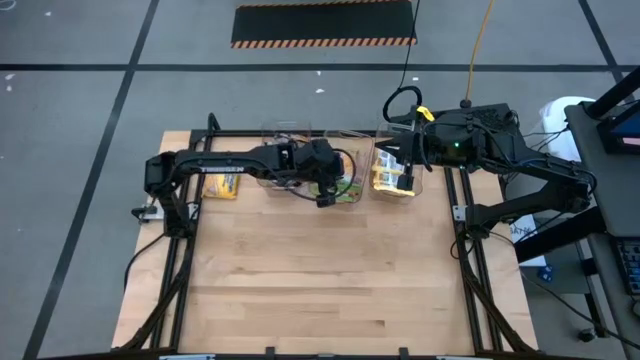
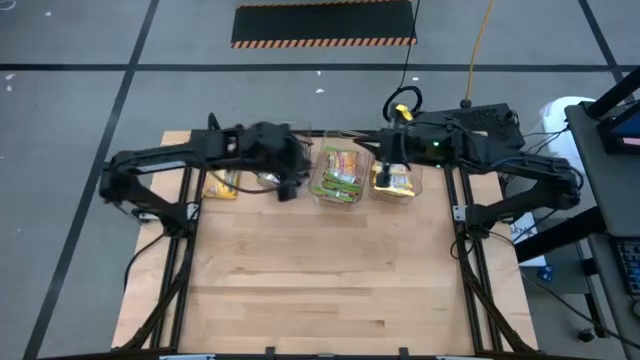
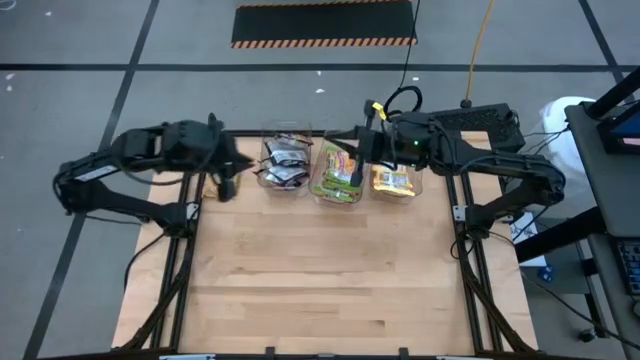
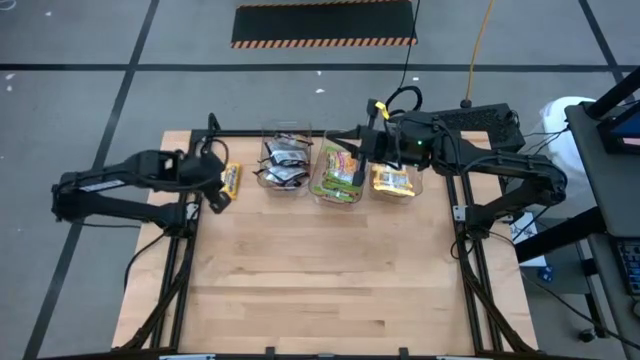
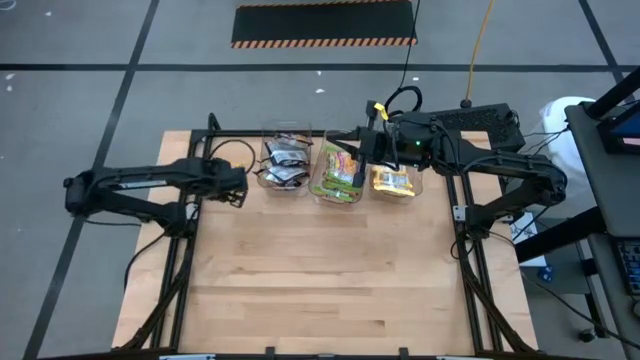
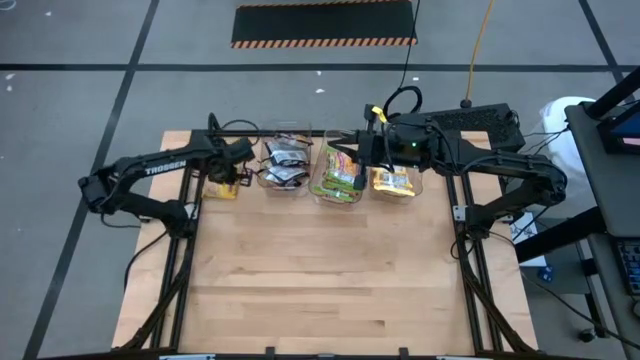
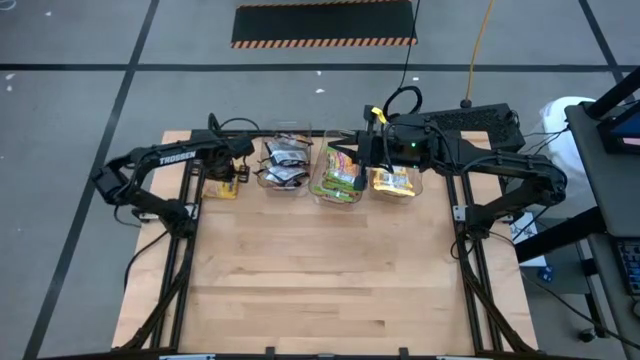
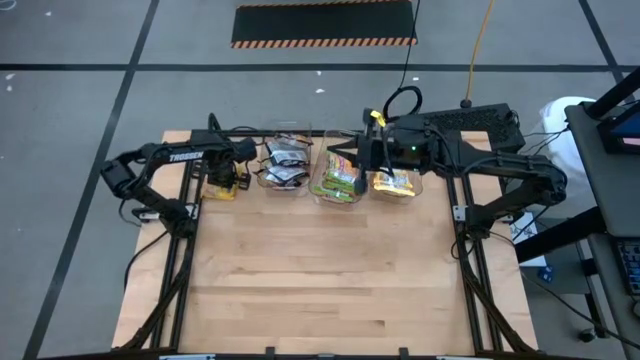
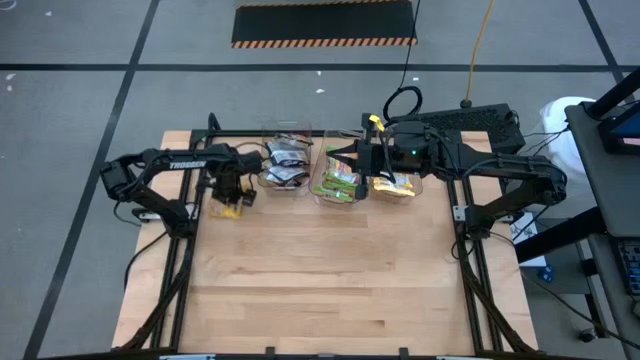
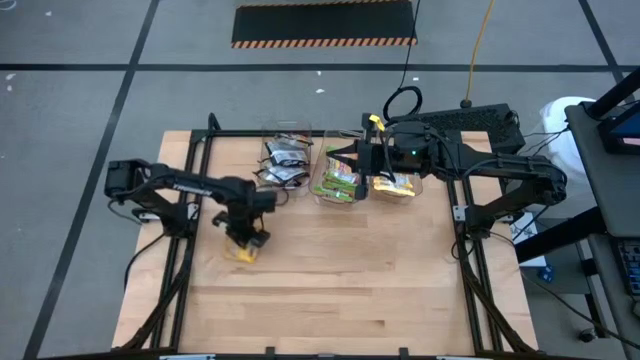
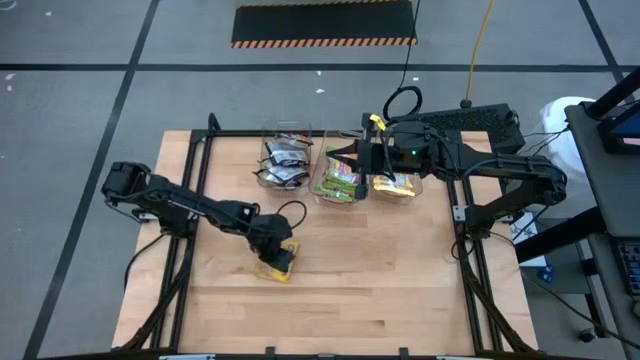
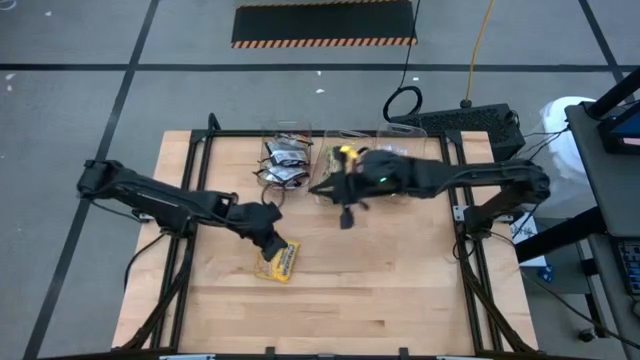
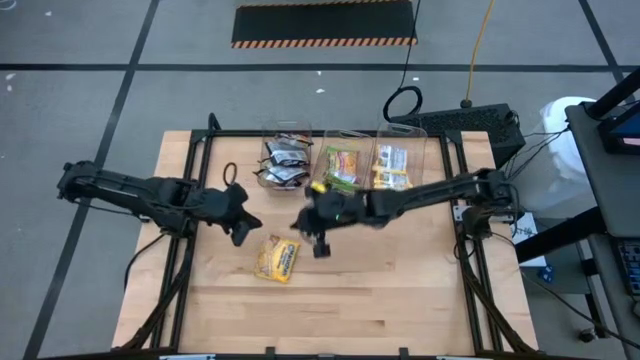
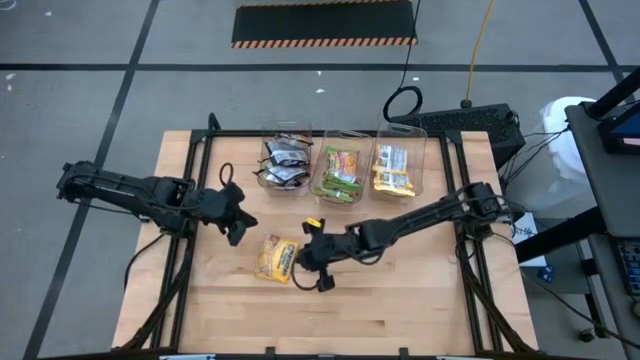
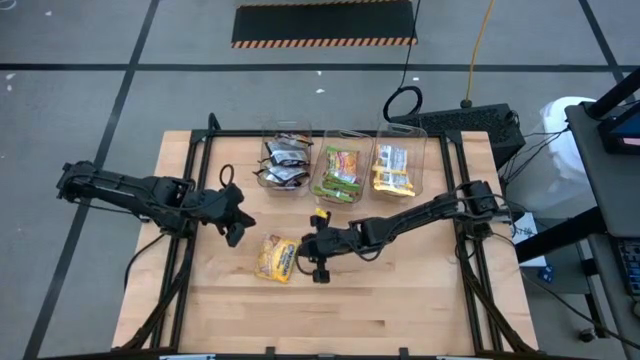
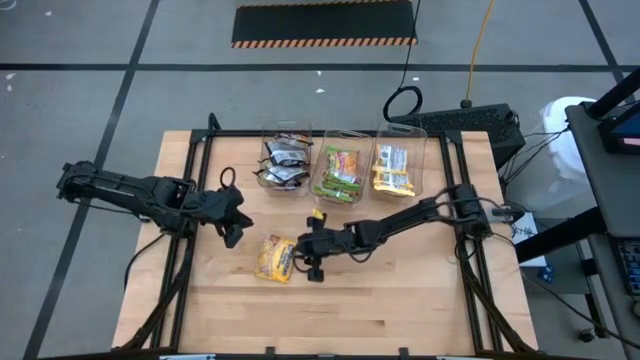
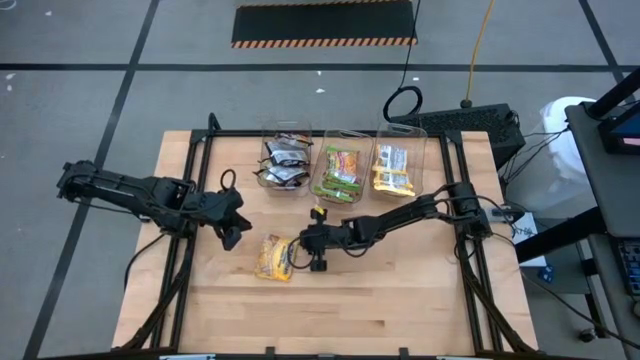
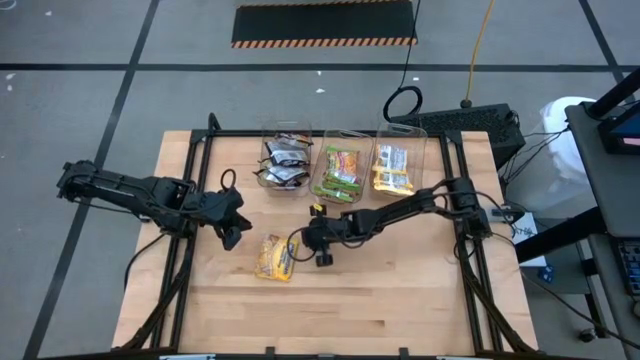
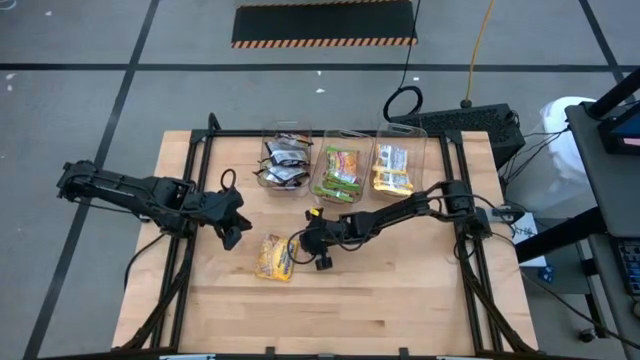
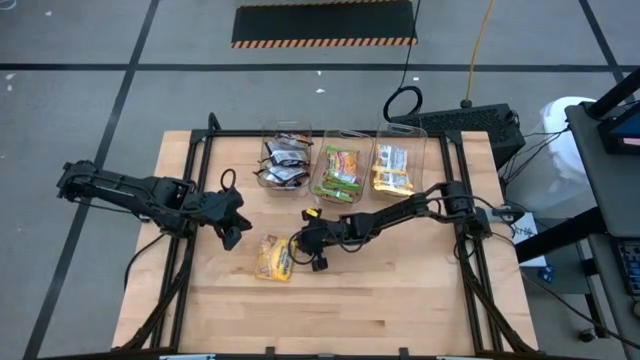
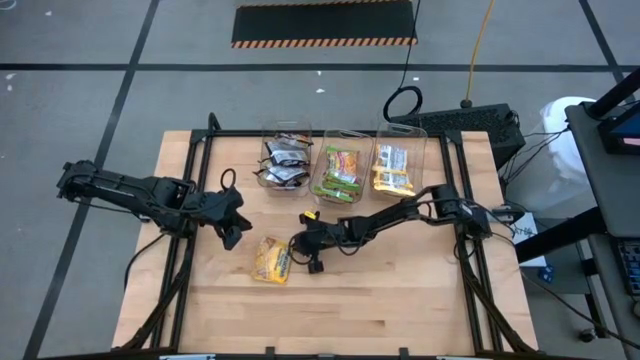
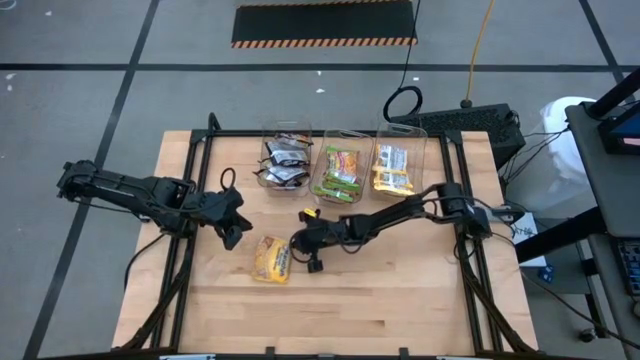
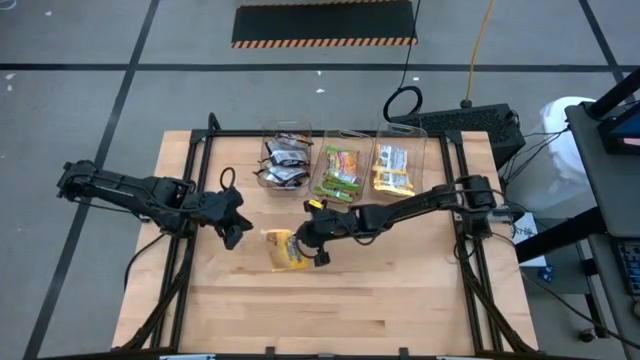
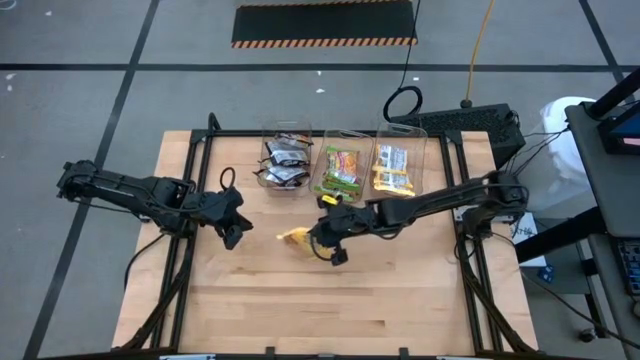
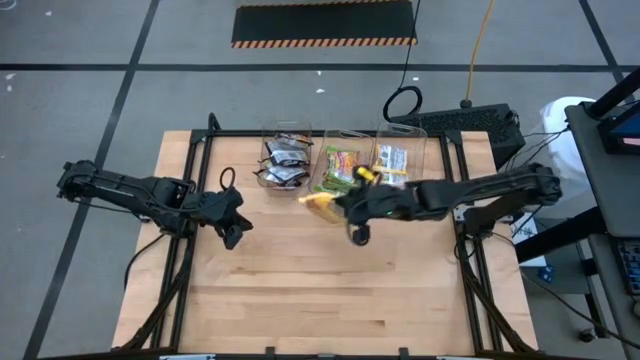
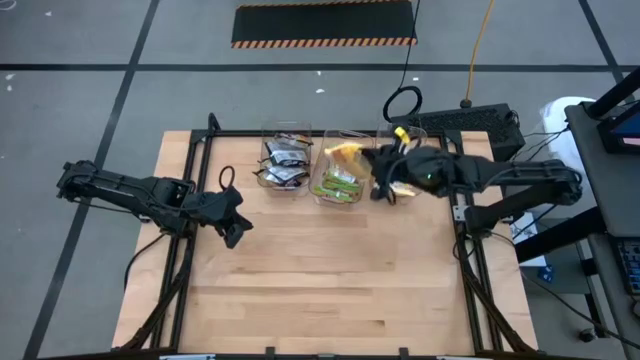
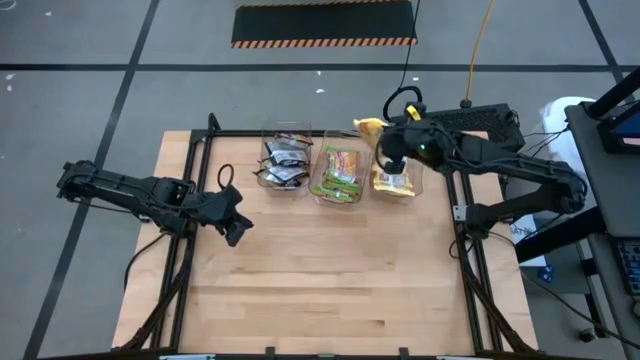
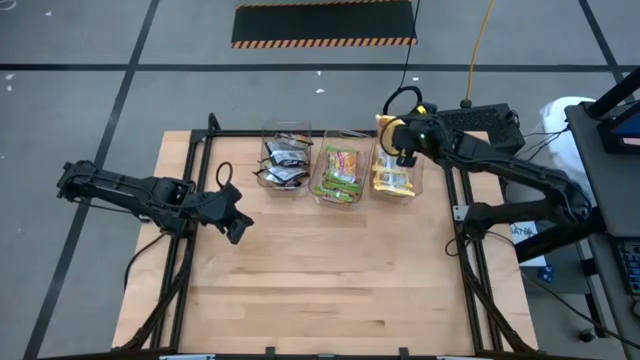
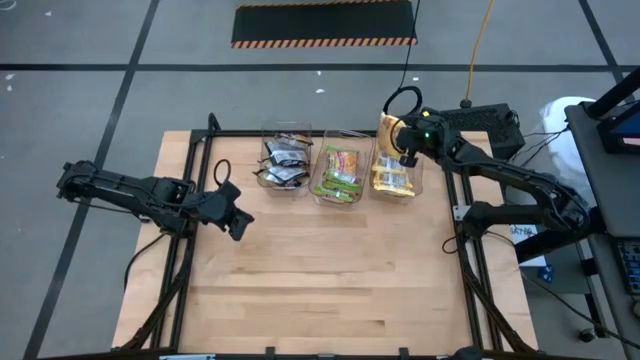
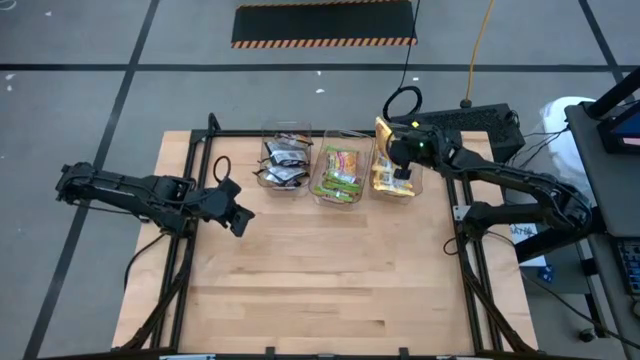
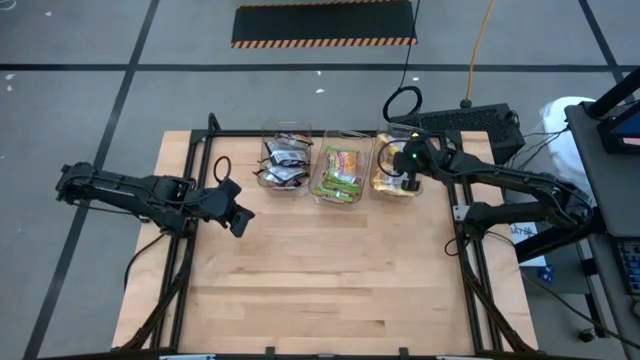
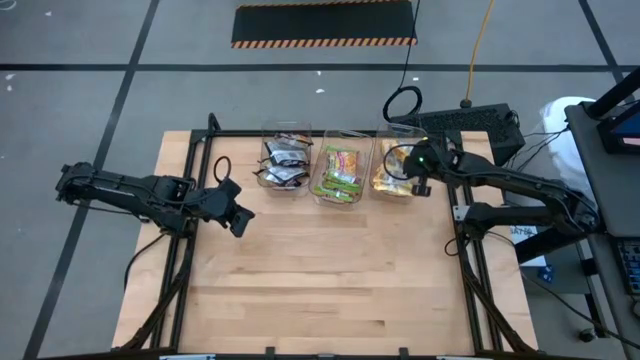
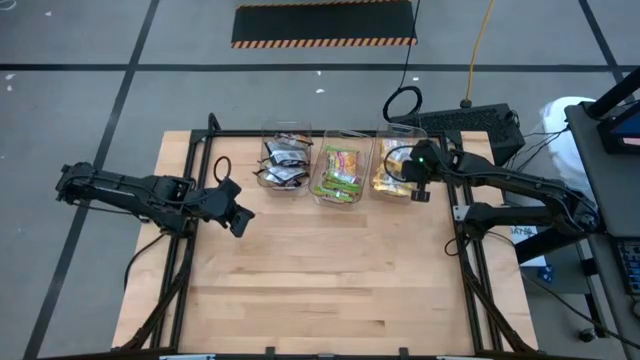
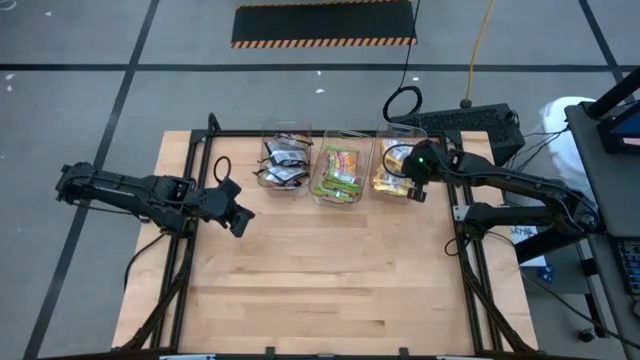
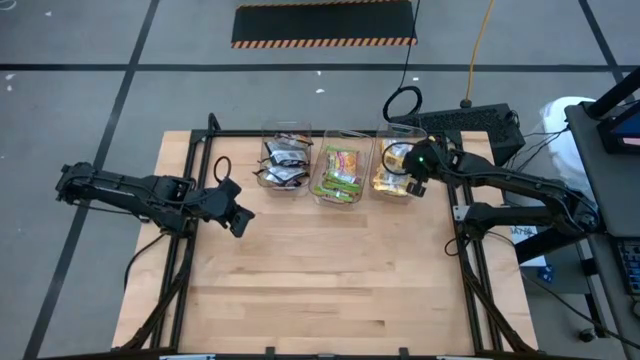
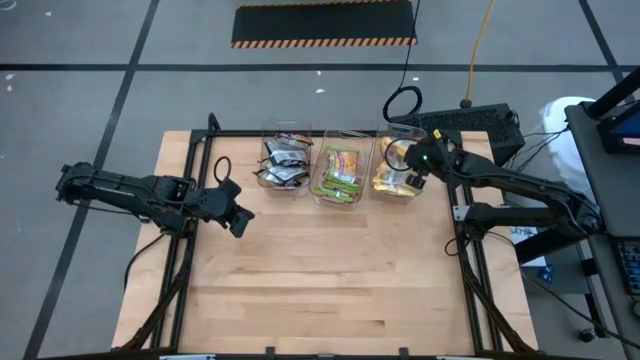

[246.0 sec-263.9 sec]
Task: Sort Maruchan noodles
Put the yellow noodle pack into the right transparent bin

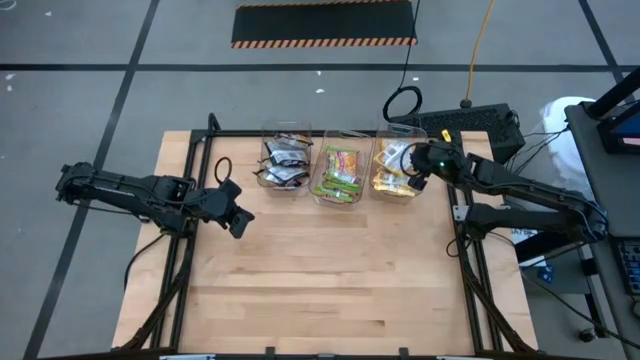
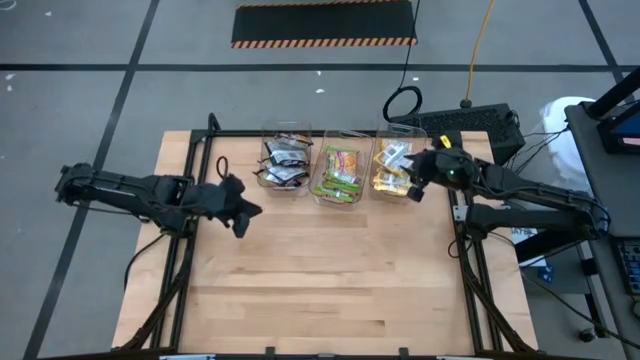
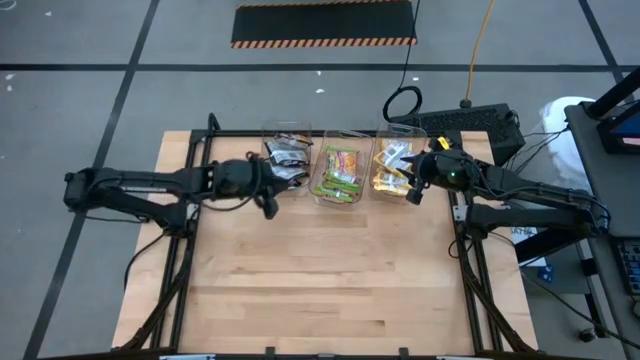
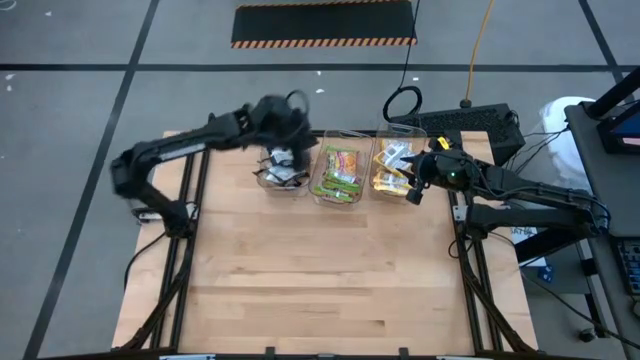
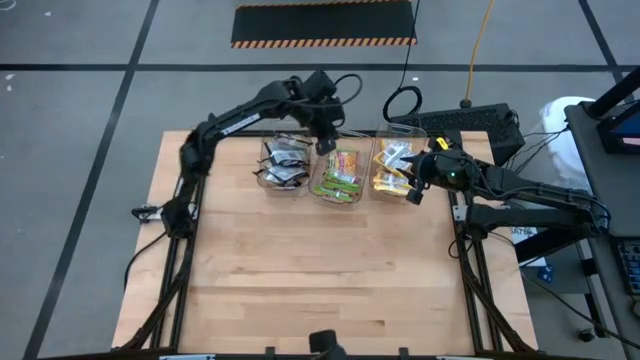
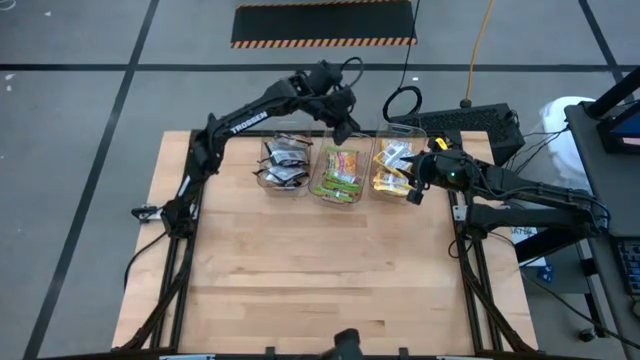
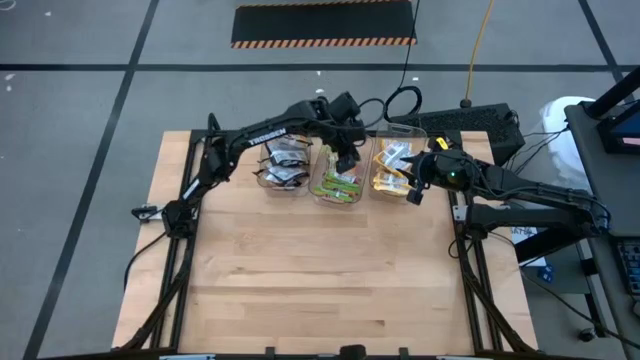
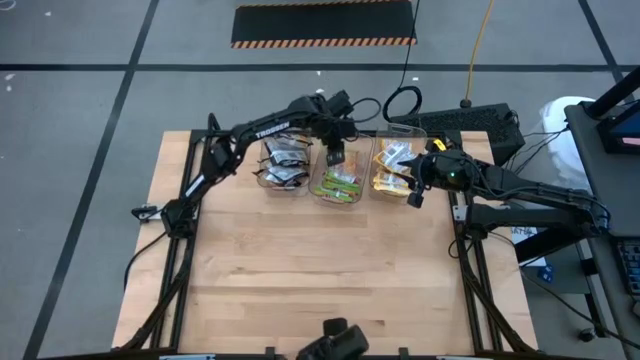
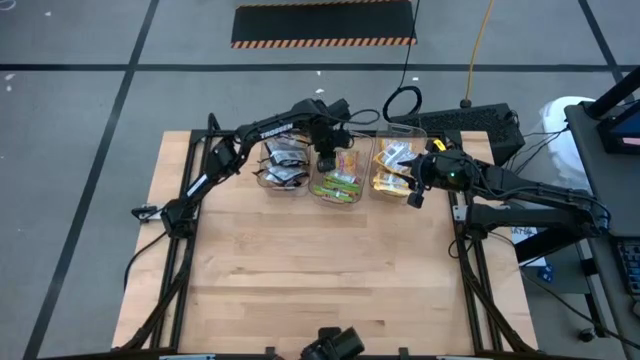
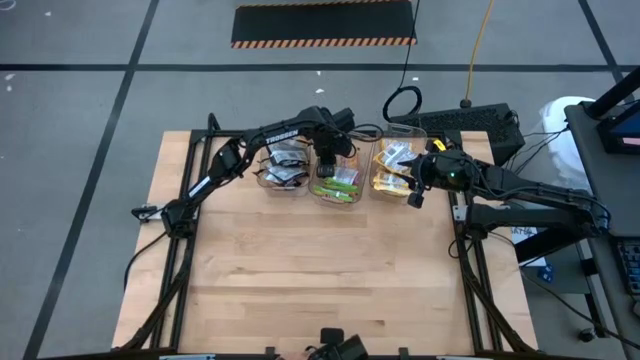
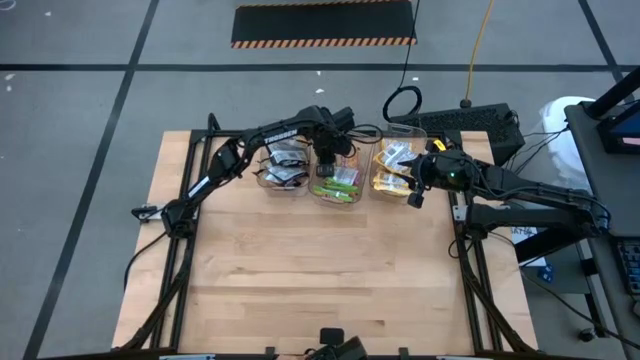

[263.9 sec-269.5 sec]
Adjust the green noodle pack in the middle transparent bin
